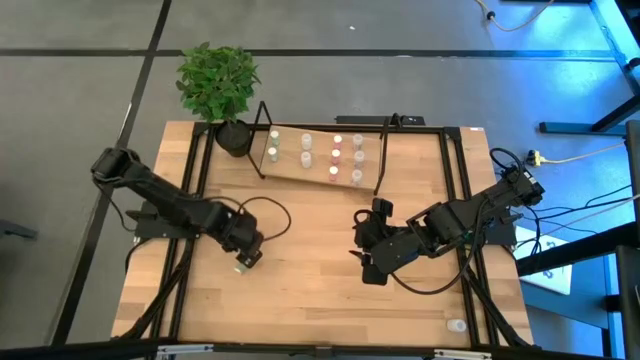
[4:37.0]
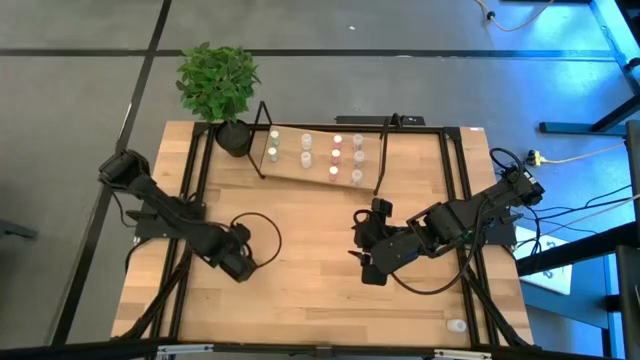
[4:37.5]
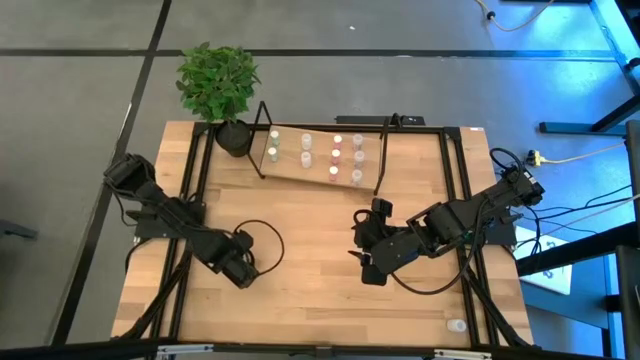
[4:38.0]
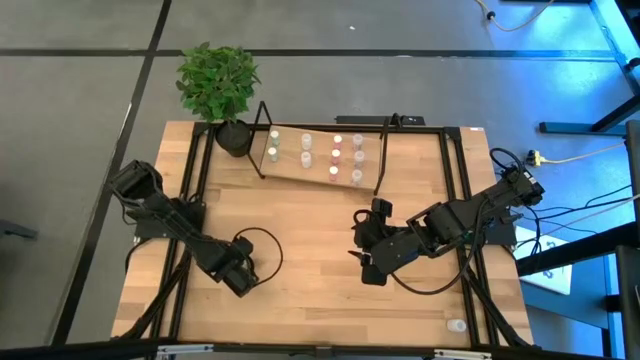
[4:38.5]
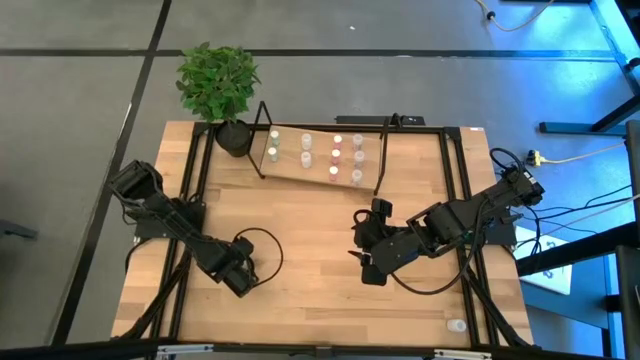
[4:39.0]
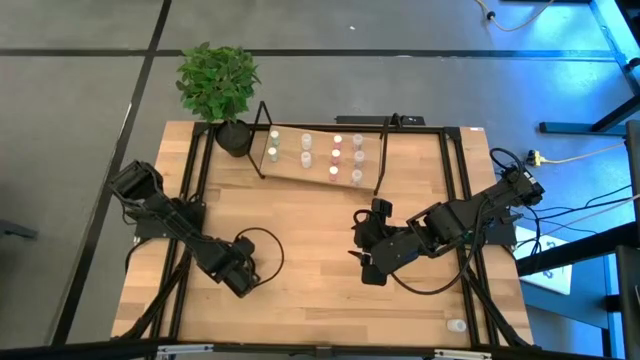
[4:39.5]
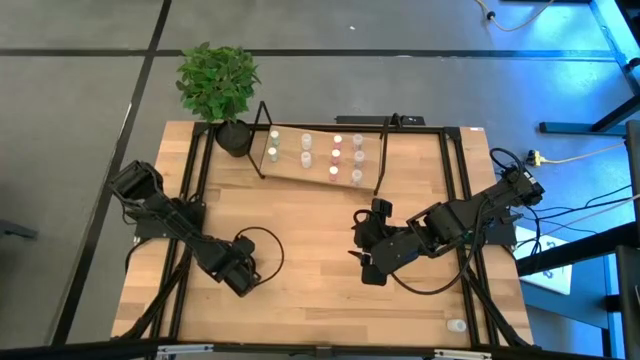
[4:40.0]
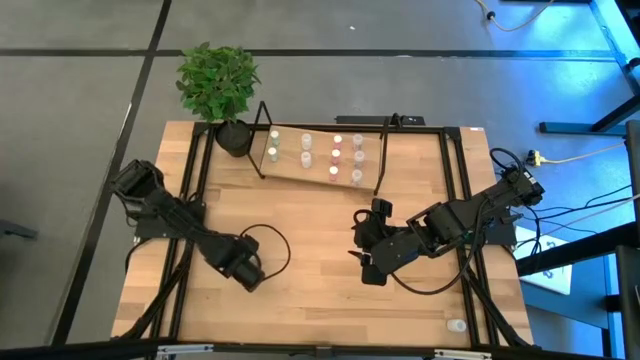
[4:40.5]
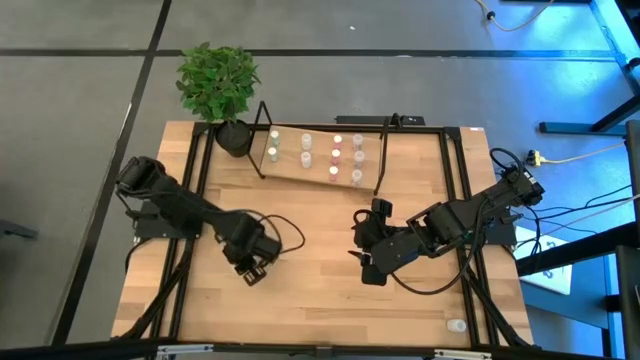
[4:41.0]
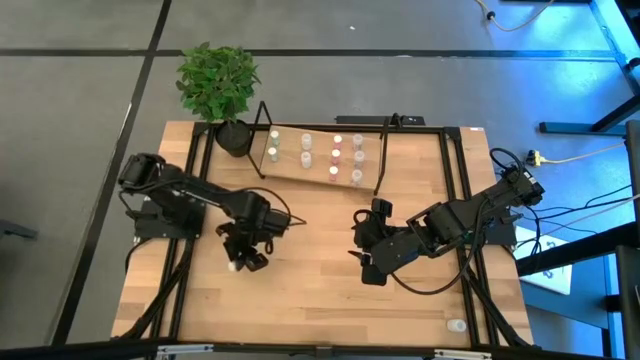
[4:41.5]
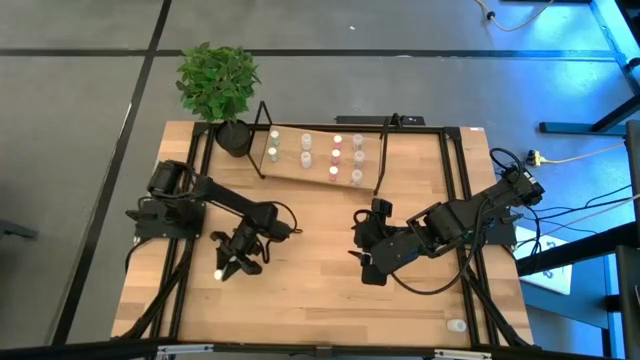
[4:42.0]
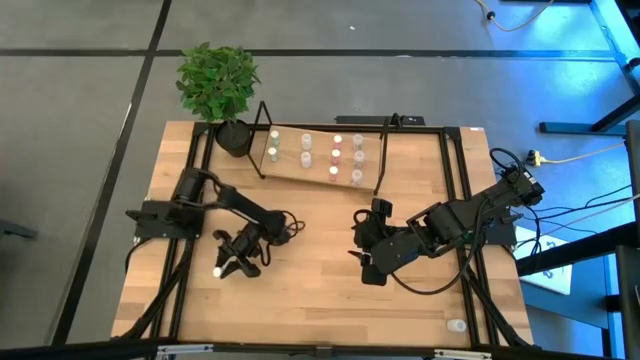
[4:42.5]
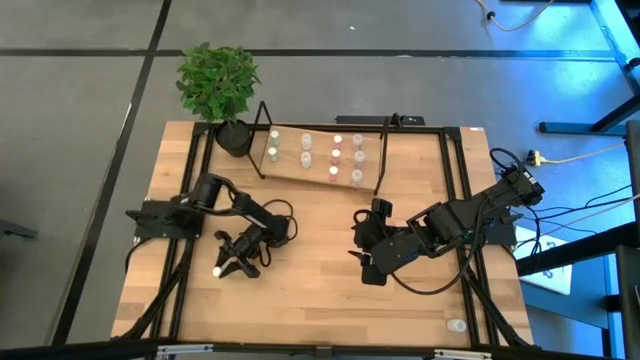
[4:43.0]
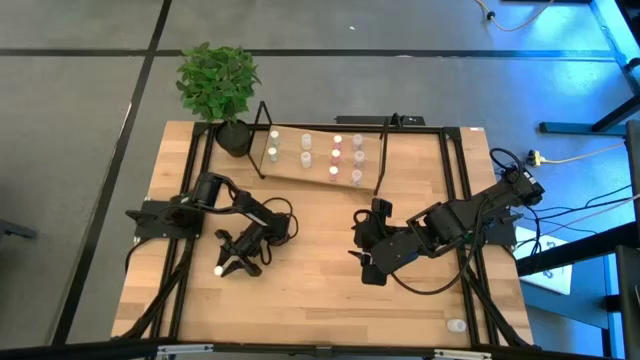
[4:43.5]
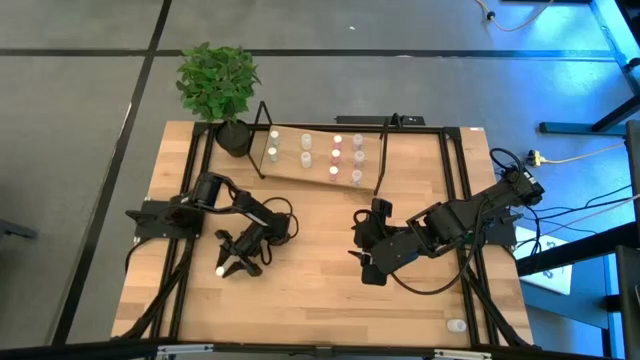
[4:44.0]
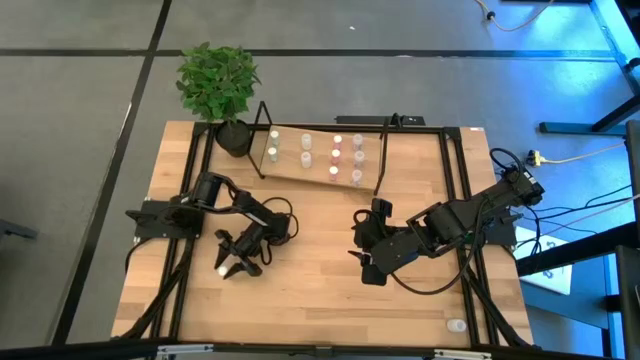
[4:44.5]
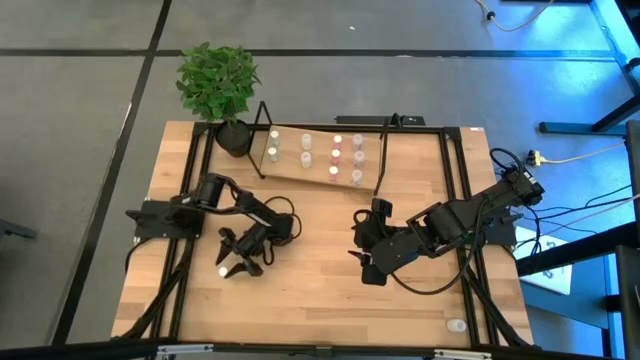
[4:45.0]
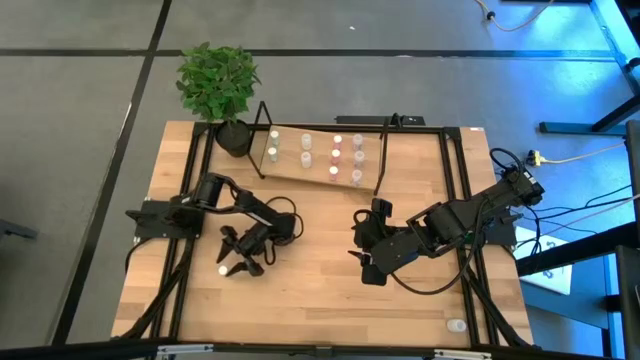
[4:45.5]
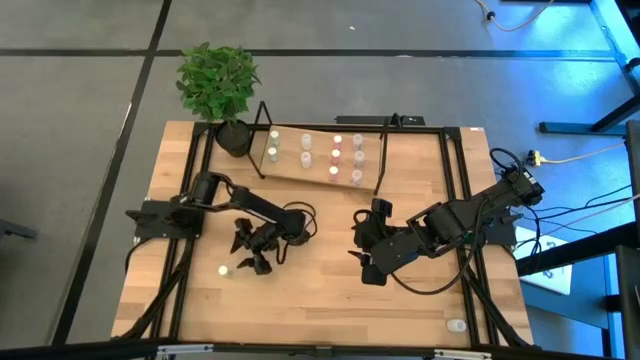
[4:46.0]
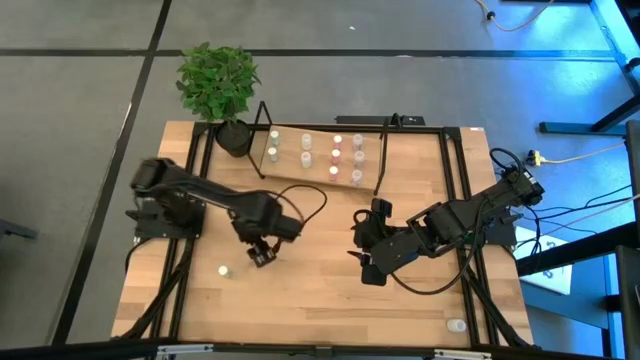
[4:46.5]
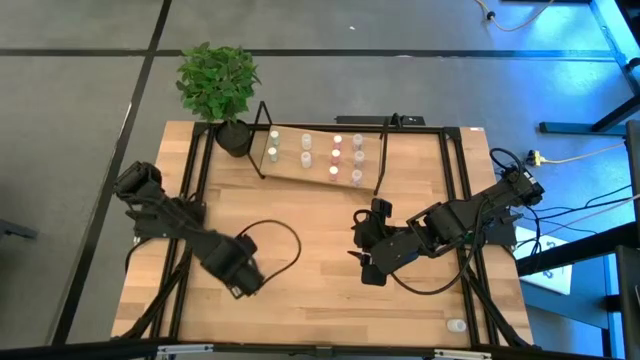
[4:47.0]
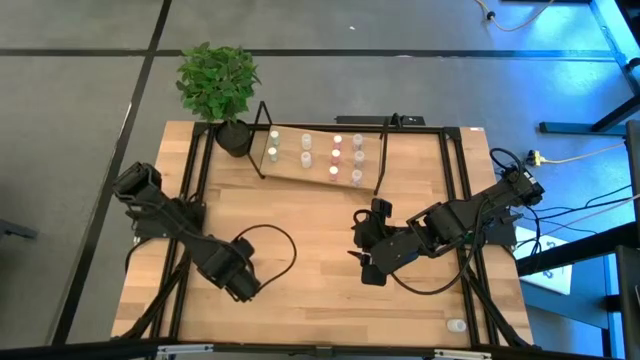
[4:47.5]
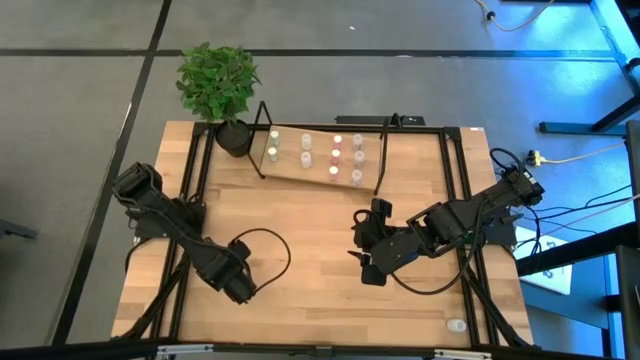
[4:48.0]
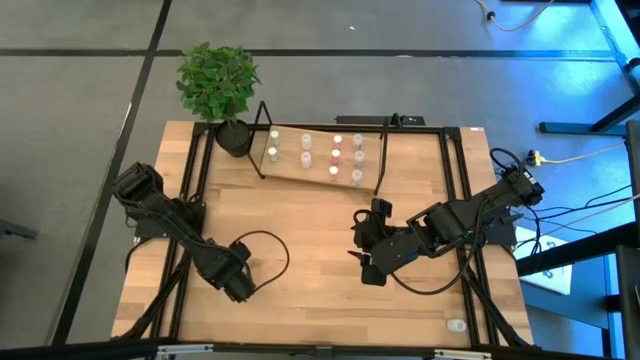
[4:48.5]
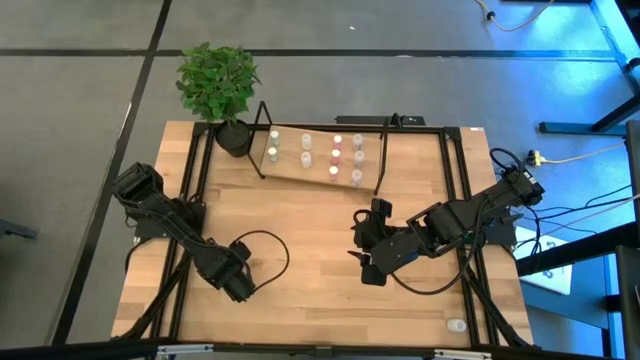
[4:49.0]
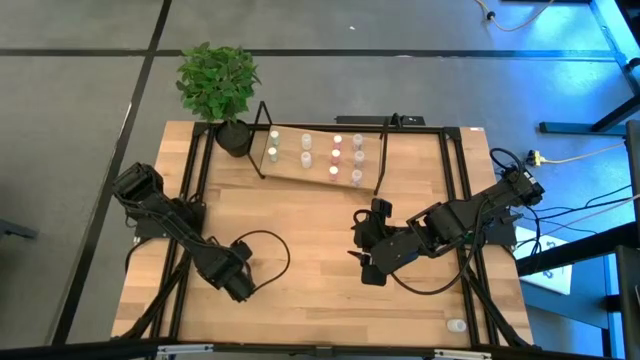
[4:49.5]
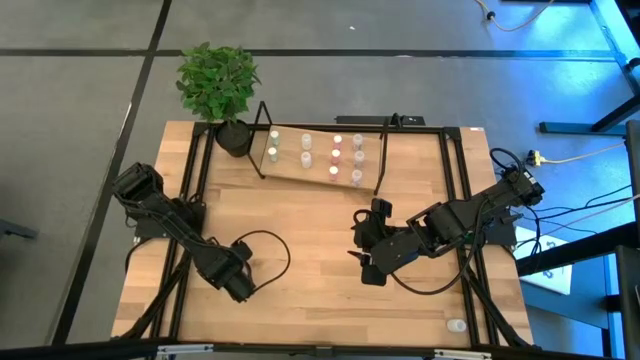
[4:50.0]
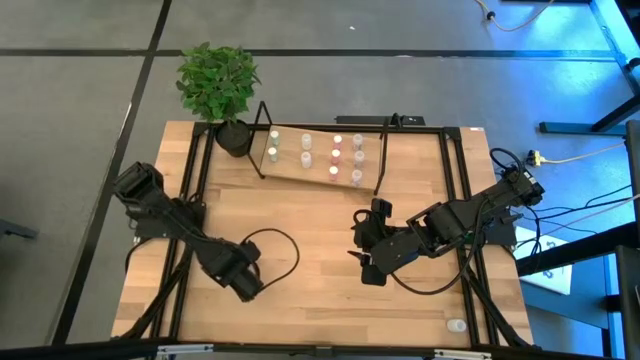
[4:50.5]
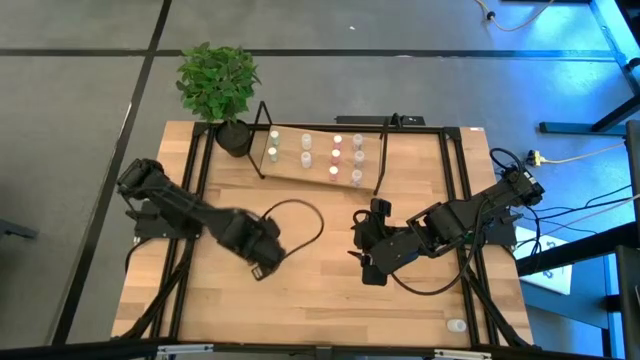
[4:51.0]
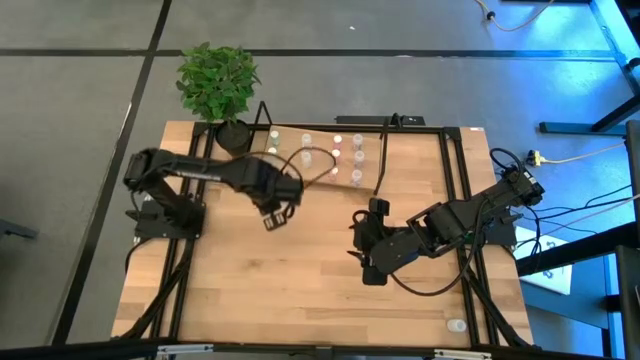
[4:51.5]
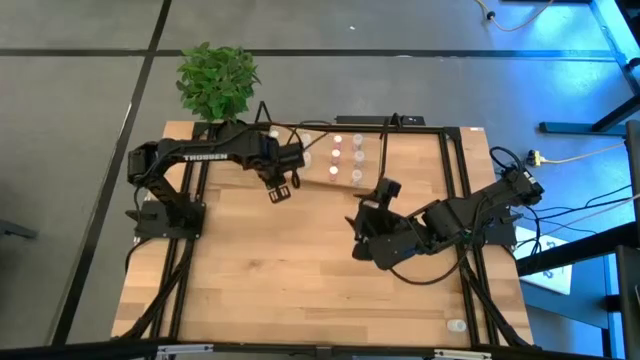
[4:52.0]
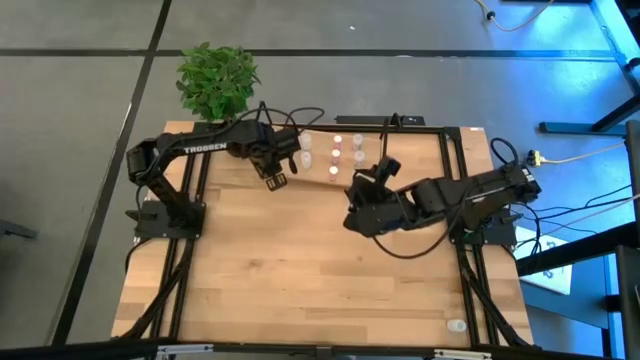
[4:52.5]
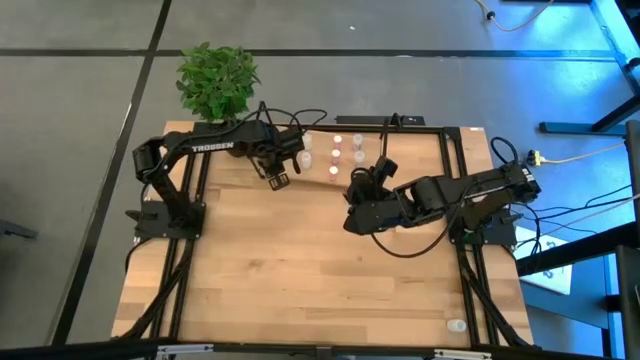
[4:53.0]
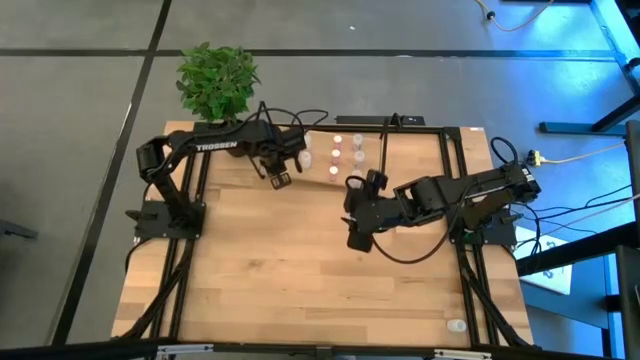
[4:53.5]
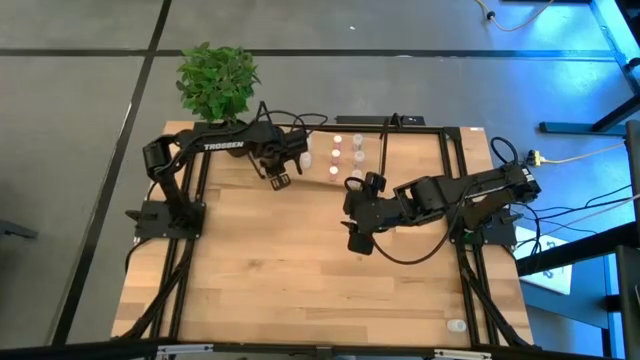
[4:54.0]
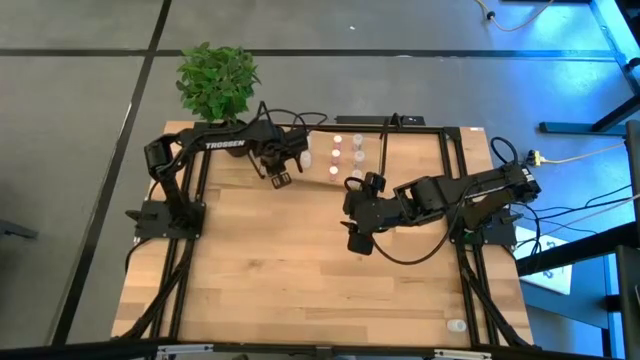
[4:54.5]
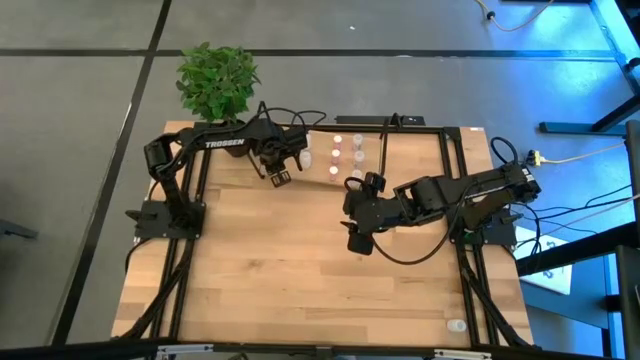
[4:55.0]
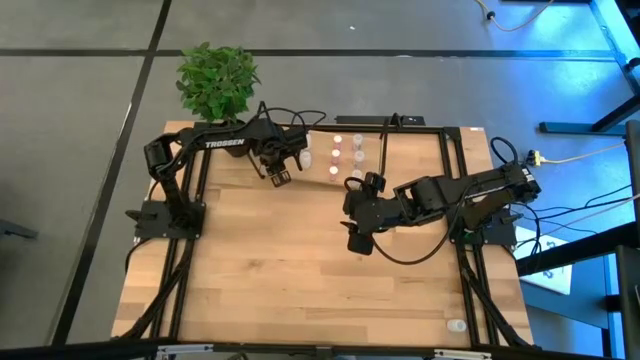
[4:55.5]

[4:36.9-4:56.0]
Task: Pick and place medicine bottles onto shelf by color
Put the blue medicine bottle on the shelf aligned with the other blue medicine bottle

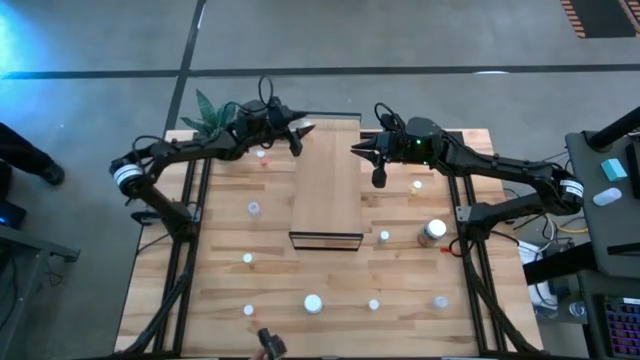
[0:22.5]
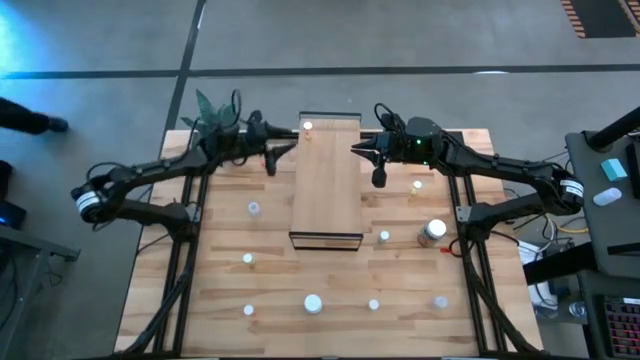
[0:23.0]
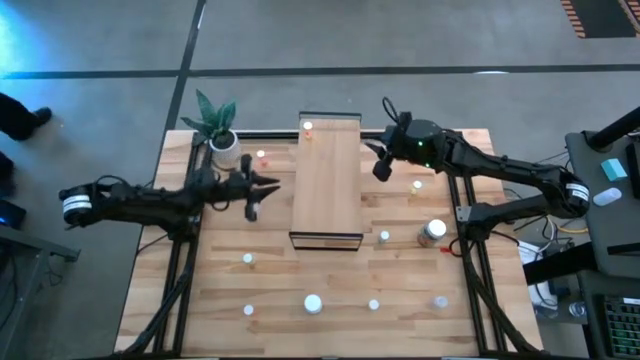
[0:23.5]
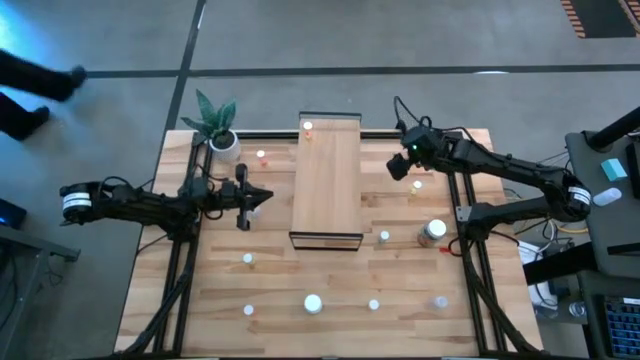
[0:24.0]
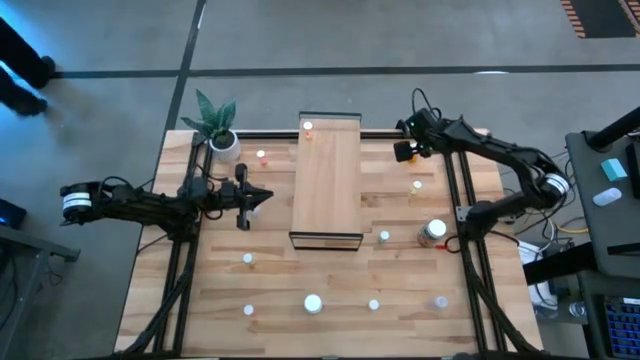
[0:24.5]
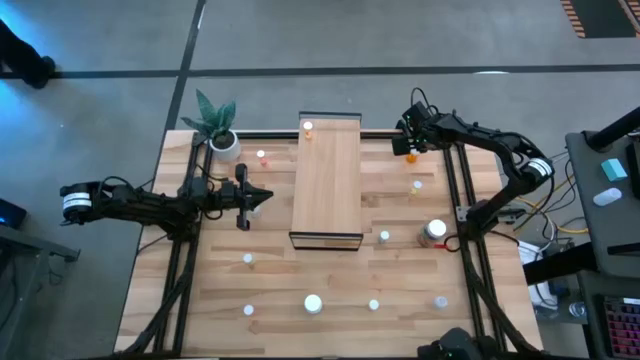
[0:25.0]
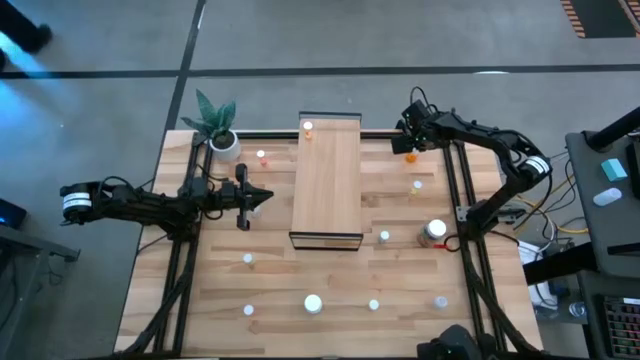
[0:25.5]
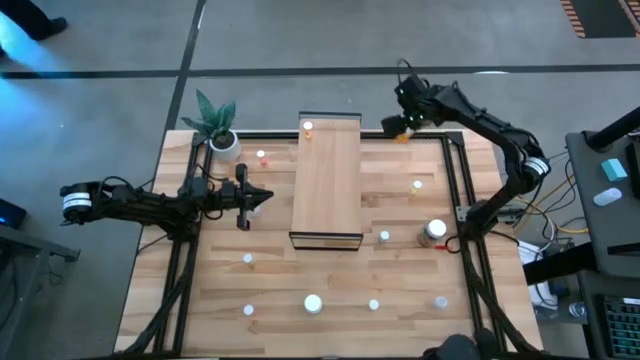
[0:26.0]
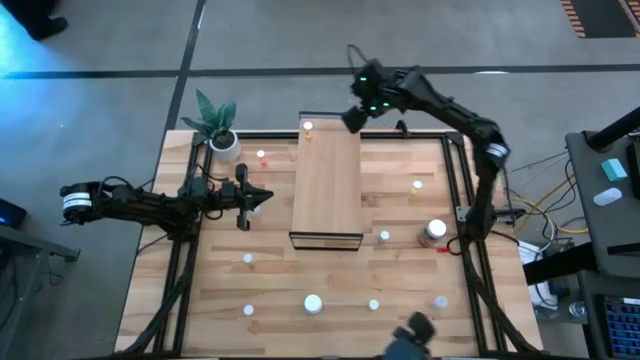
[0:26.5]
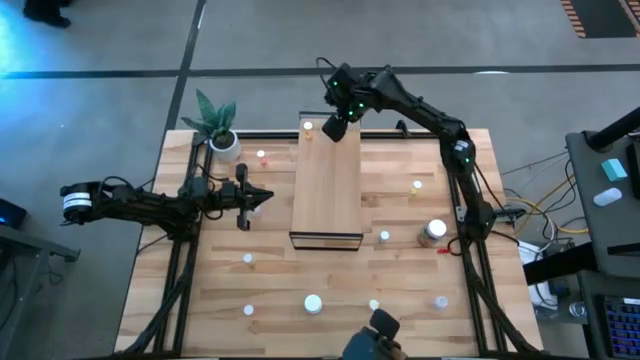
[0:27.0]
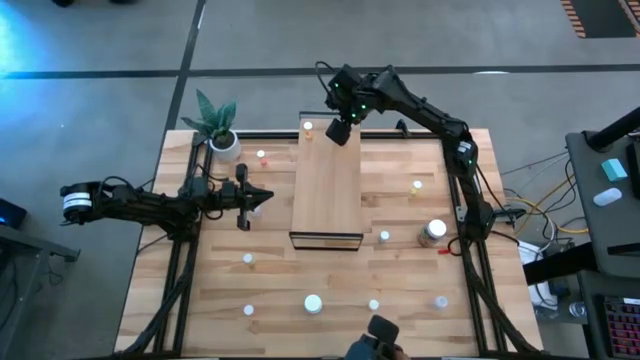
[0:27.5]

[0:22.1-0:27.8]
Task: Pick and place medicine bottles onto shelf by color
Put the orange pill bottle on the shelf
